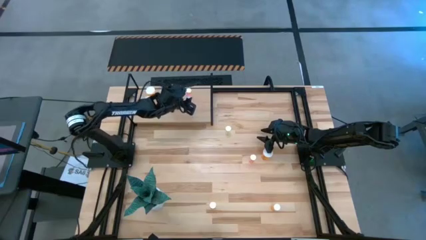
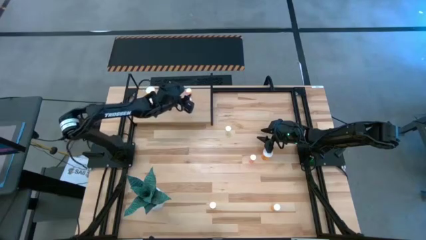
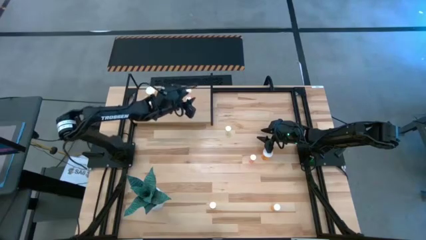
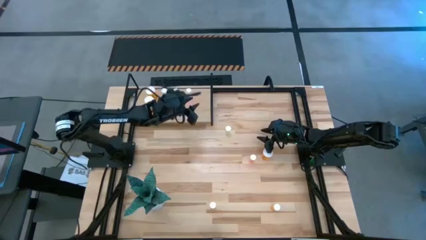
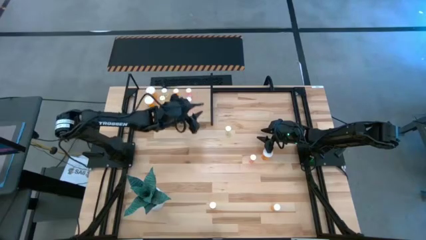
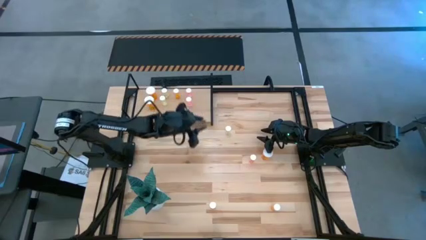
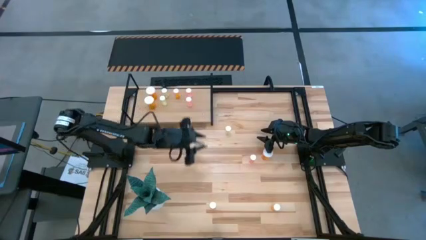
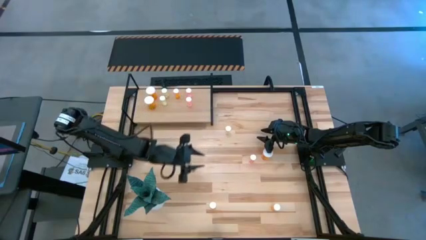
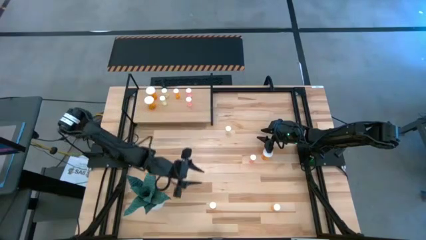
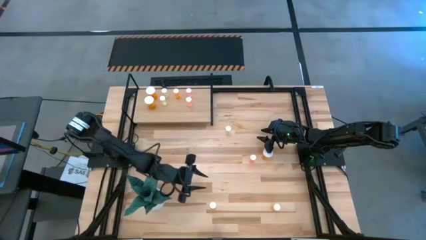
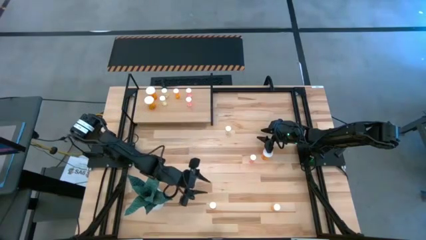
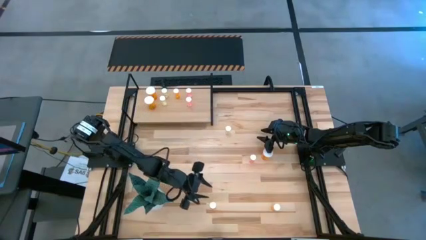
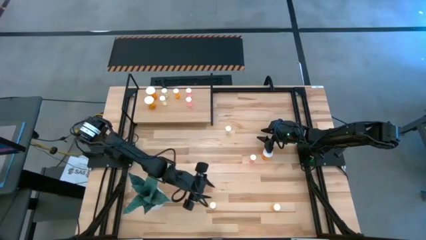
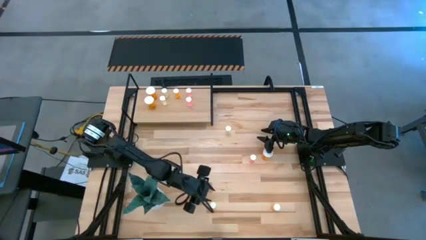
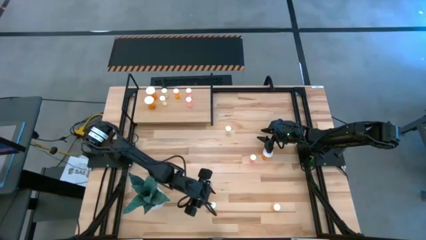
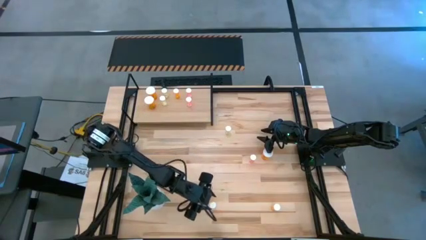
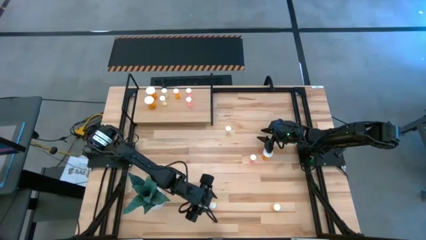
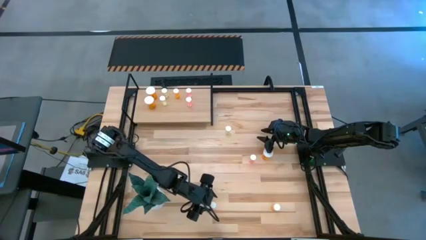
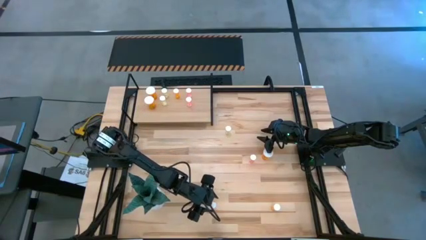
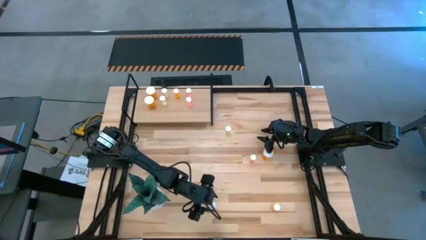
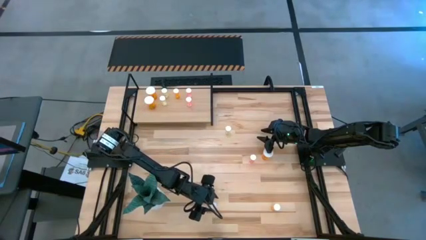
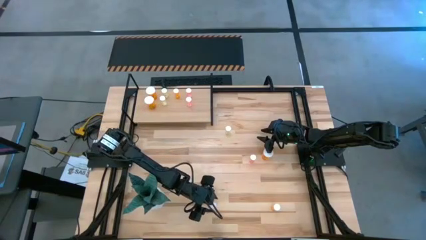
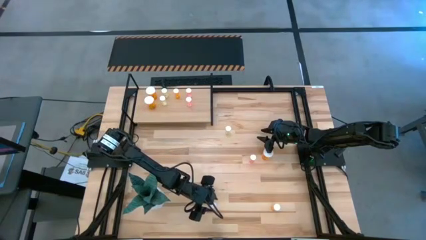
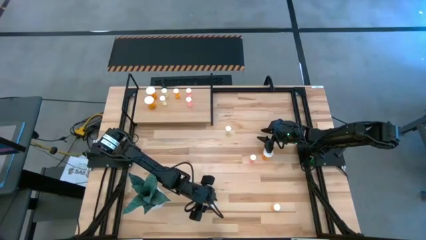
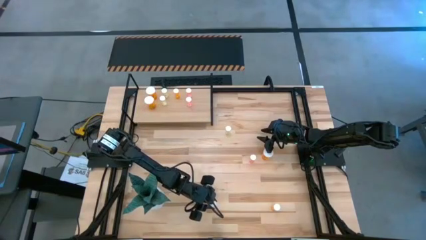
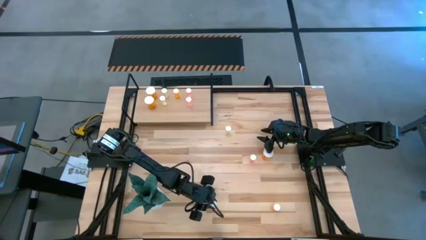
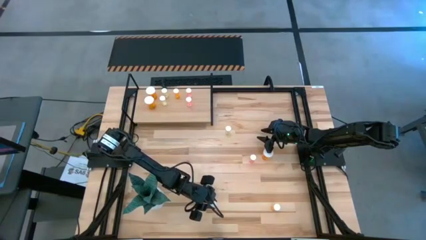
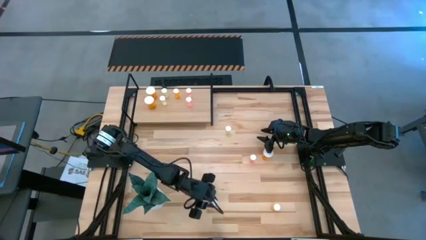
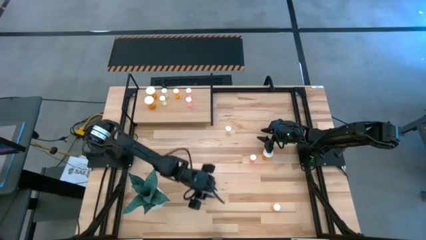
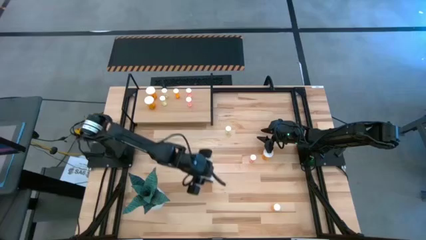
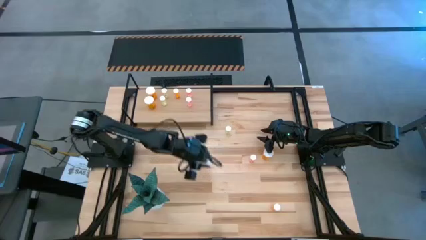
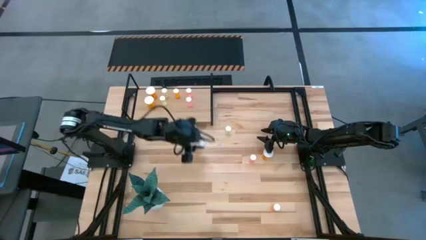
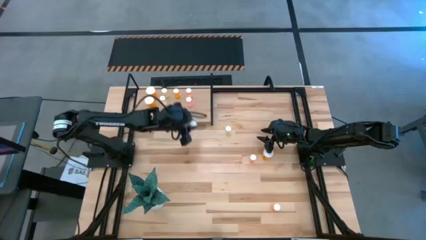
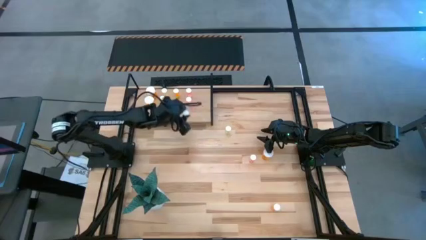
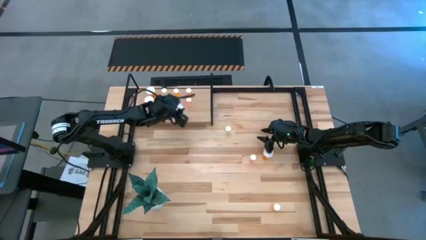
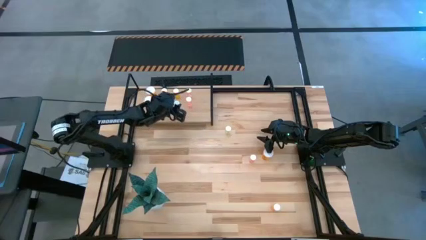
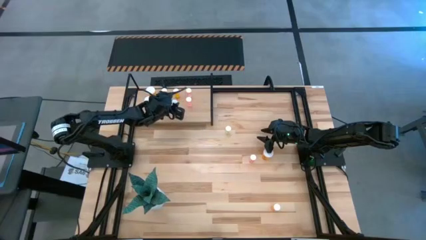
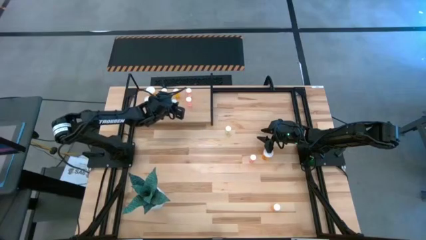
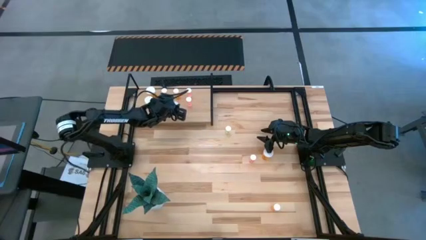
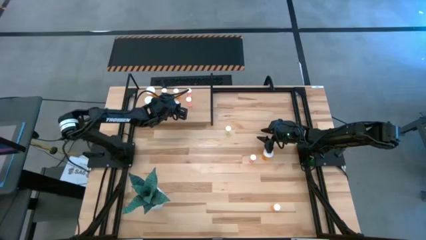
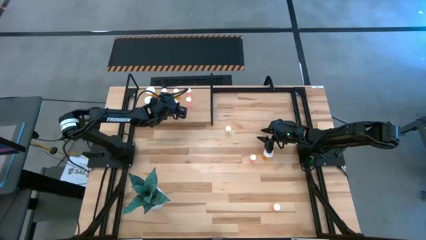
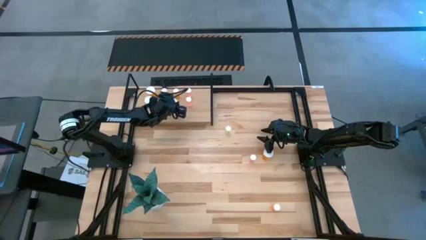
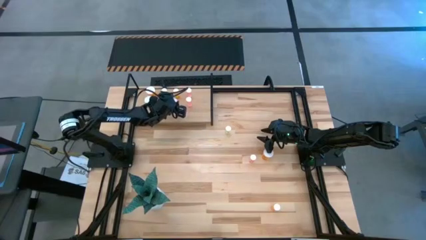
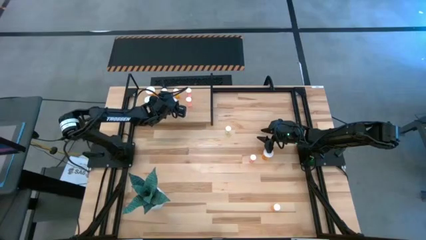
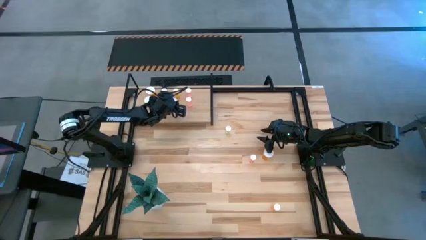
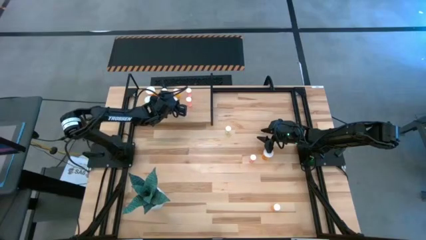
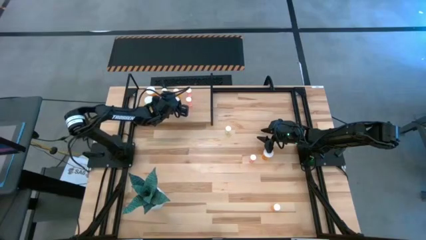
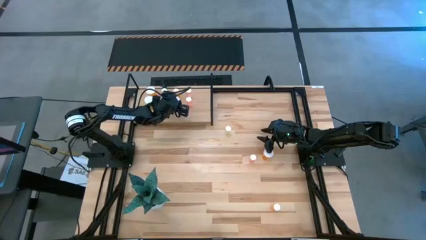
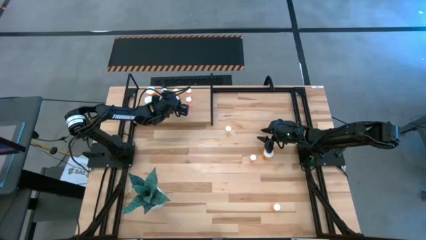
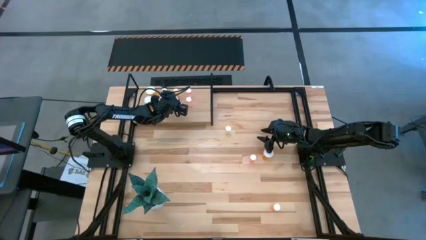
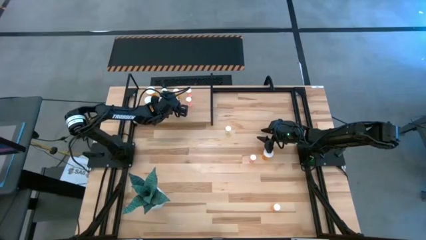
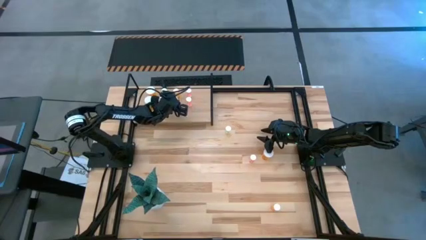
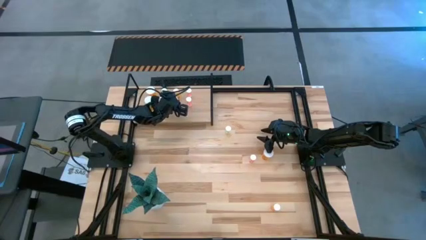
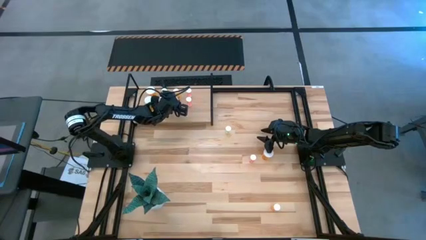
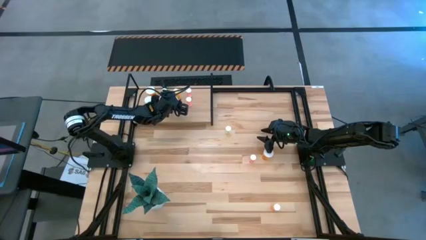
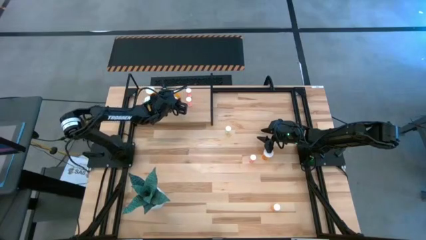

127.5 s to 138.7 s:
Task: Pick and place medicine bottles onto shelf by color
Put the left small orange pill bottle aligned with the other small orange pill bottle on the shelf
